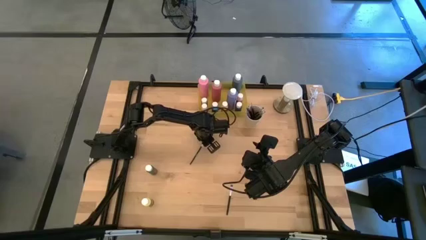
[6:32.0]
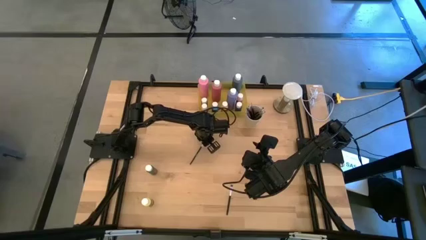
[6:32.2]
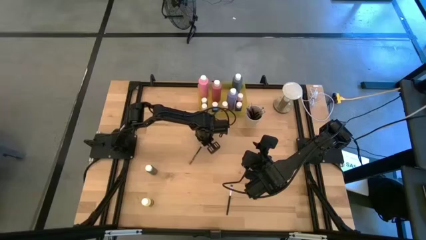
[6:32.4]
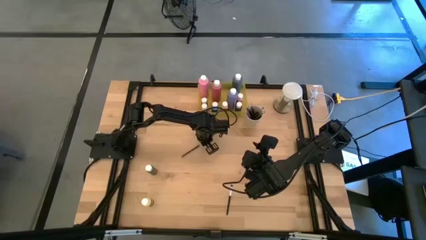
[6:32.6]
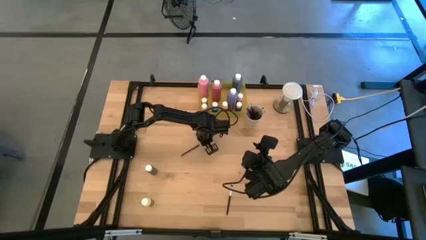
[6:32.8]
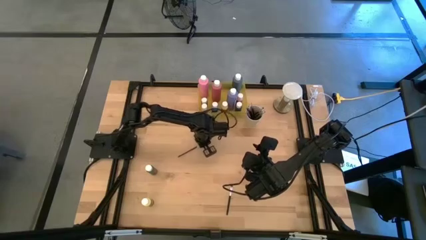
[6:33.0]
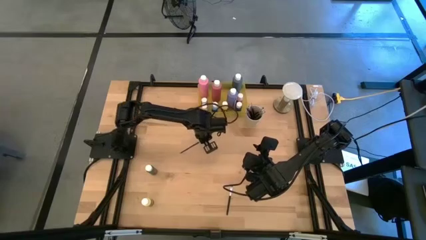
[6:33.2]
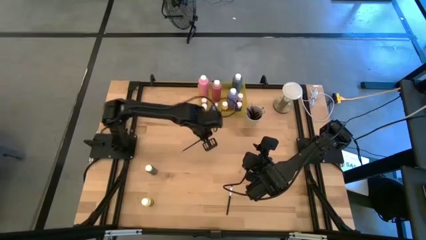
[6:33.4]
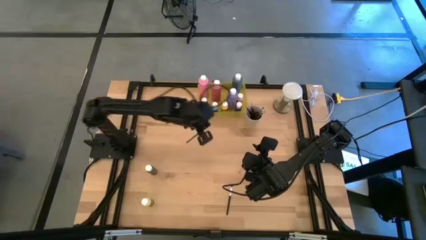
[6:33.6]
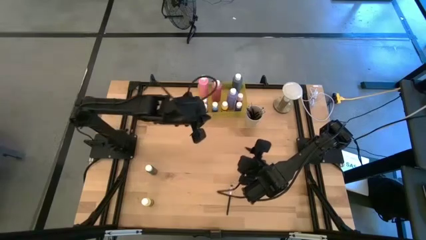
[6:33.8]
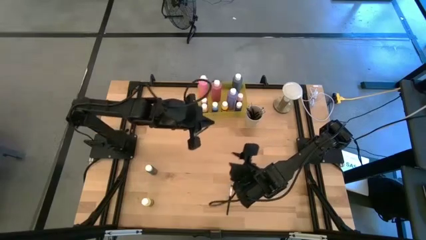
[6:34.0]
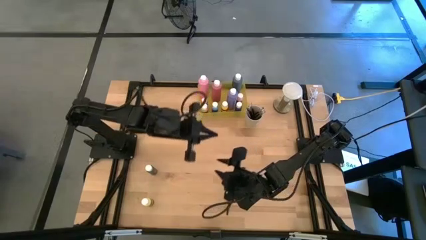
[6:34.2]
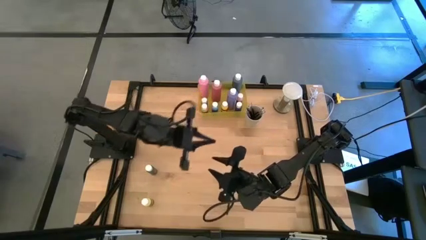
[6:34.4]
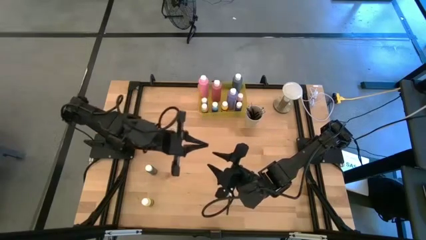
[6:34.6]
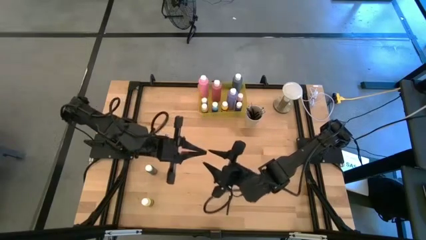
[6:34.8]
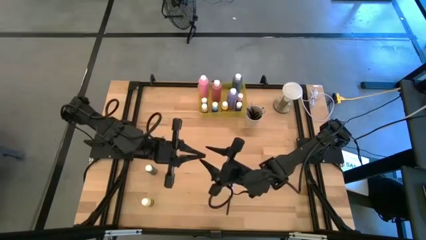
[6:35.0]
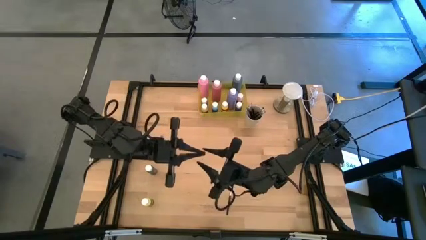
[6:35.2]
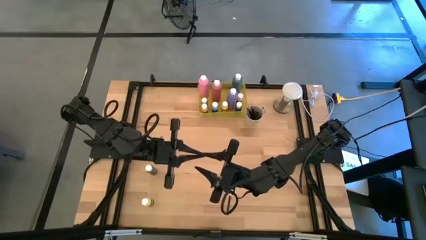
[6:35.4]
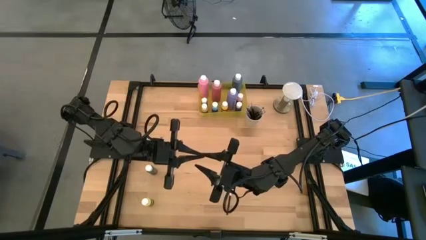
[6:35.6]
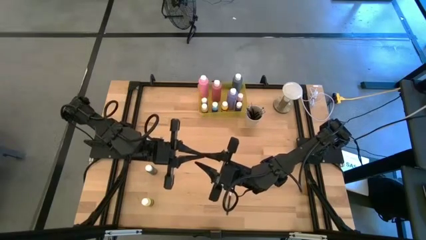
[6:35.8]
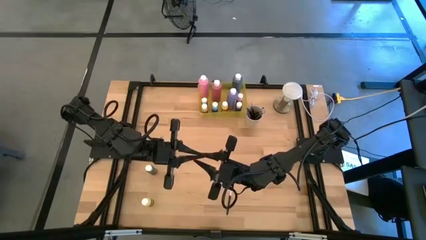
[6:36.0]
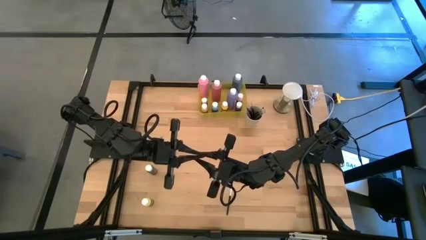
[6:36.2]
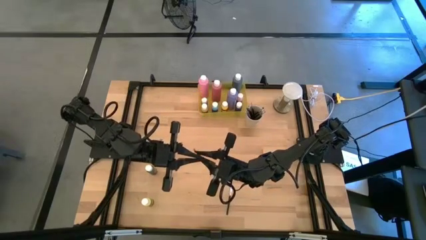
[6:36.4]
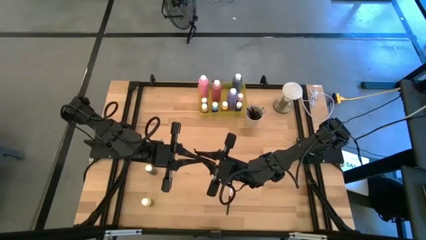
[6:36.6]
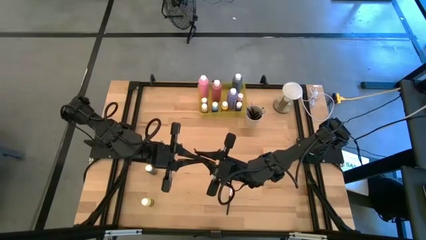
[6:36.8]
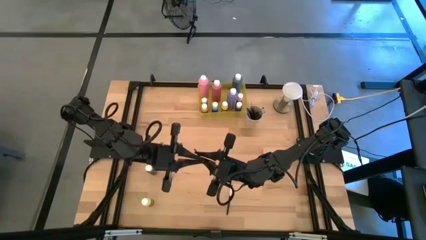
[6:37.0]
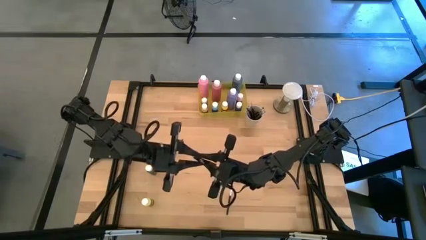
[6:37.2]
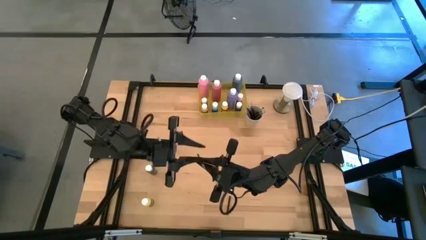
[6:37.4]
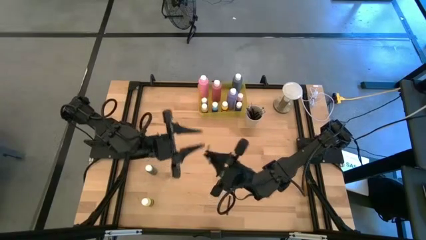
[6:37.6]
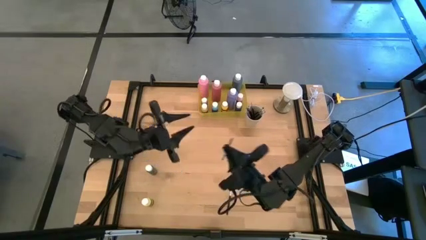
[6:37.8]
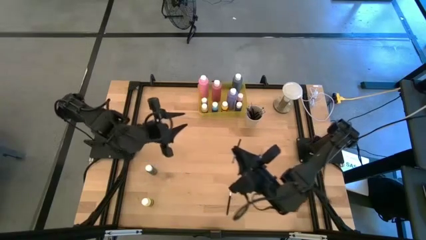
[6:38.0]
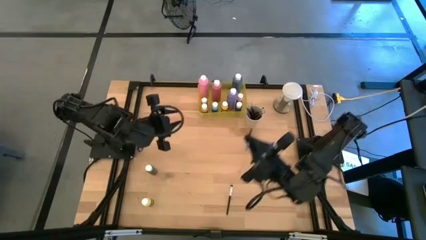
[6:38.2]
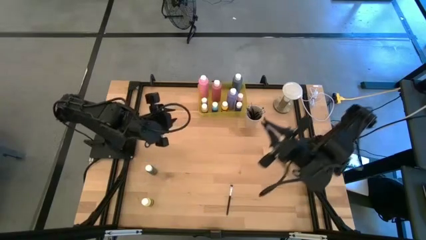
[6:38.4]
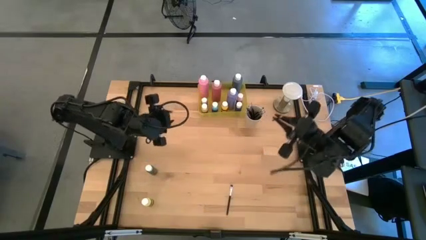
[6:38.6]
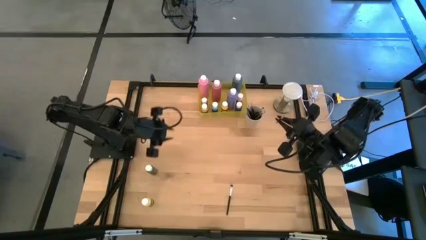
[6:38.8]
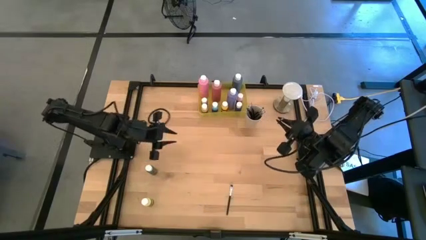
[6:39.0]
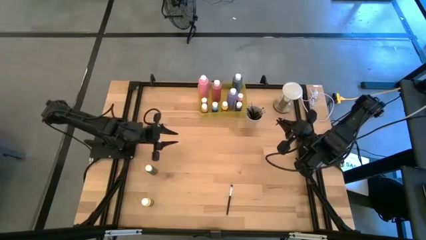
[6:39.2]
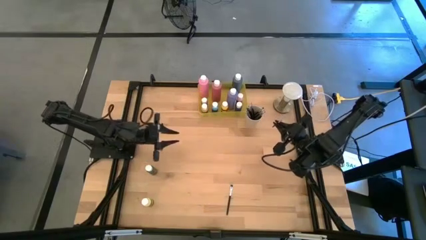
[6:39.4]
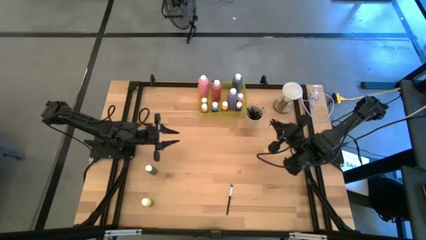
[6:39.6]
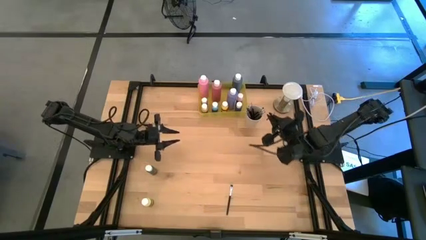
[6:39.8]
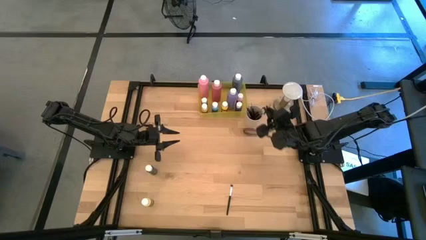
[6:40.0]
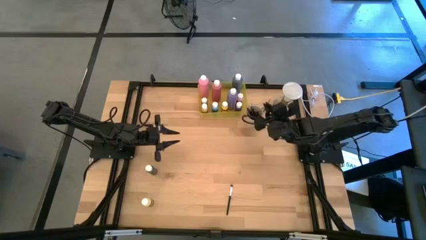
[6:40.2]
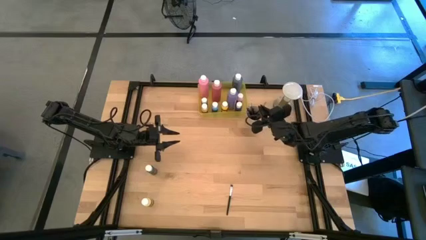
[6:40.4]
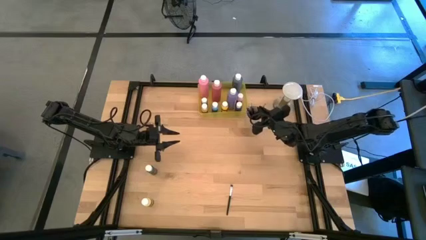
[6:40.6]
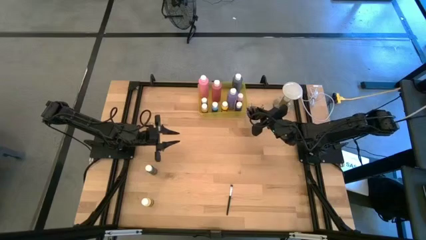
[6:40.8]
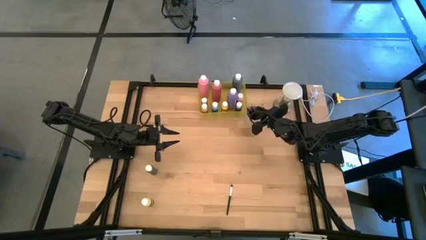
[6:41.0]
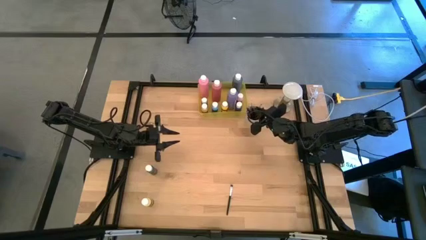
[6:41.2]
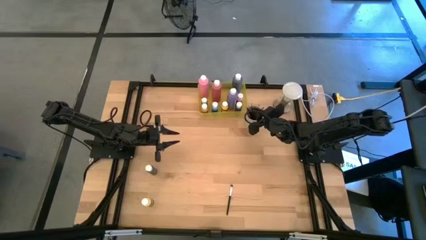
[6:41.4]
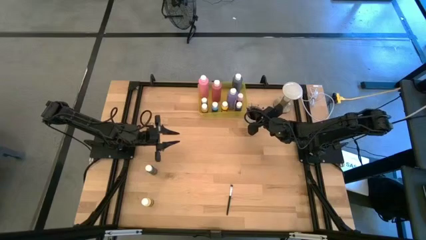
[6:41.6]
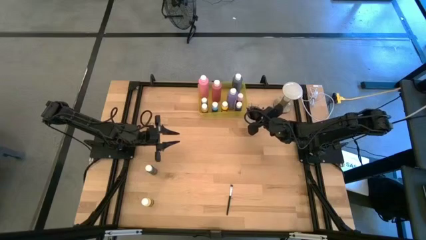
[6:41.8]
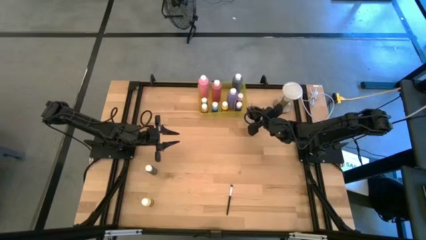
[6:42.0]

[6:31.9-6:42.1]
Task: Pick & Place Paint Supplies
Put the silver paint brush into the white cup

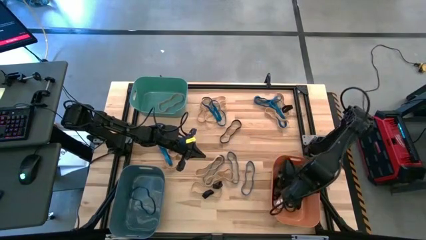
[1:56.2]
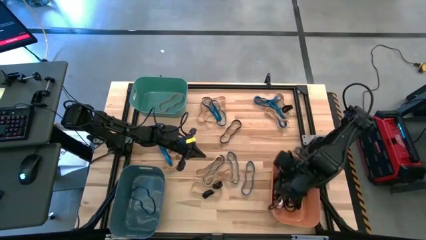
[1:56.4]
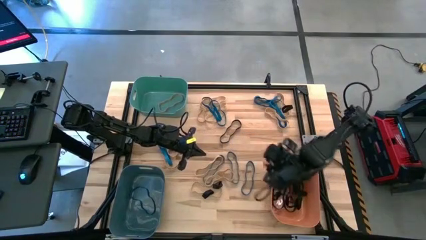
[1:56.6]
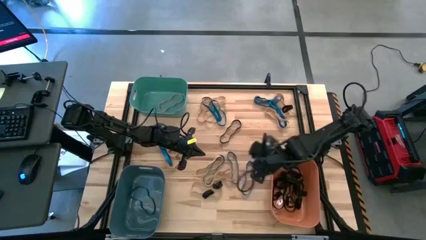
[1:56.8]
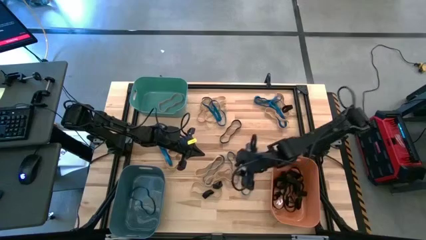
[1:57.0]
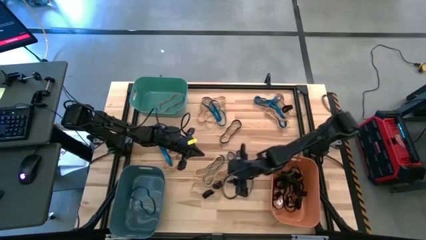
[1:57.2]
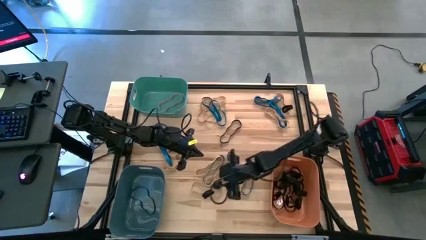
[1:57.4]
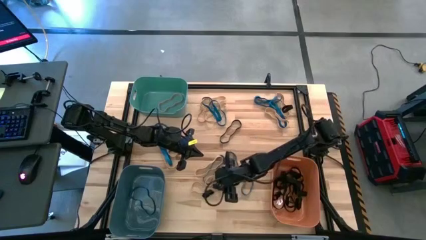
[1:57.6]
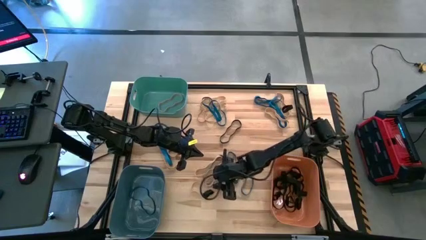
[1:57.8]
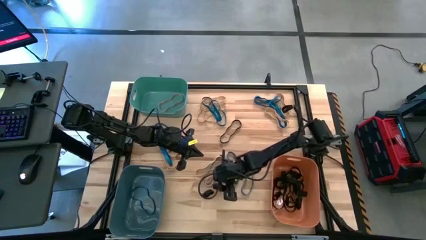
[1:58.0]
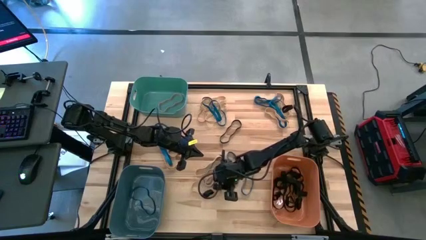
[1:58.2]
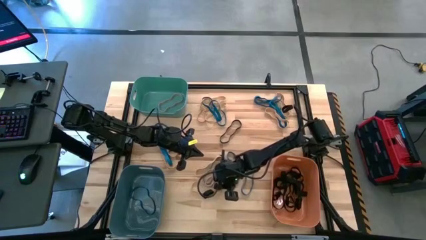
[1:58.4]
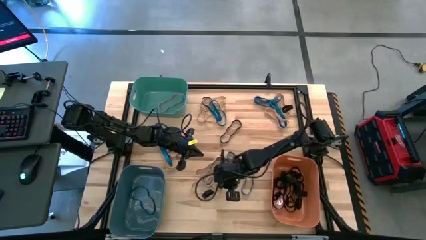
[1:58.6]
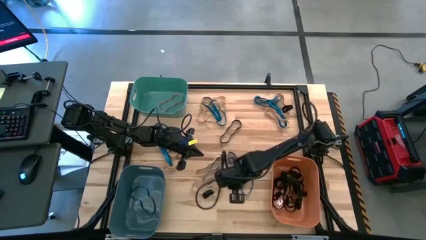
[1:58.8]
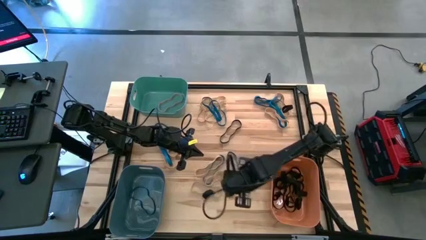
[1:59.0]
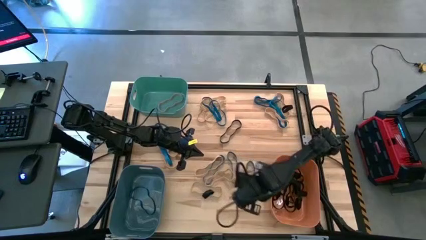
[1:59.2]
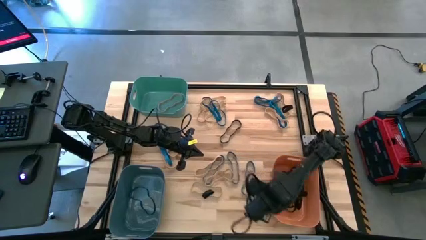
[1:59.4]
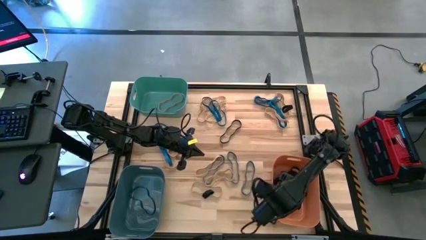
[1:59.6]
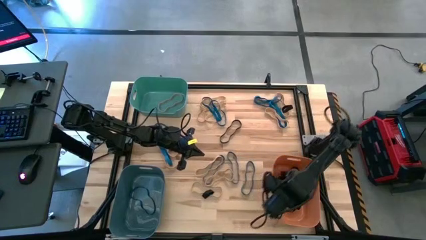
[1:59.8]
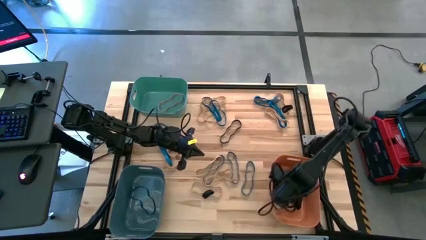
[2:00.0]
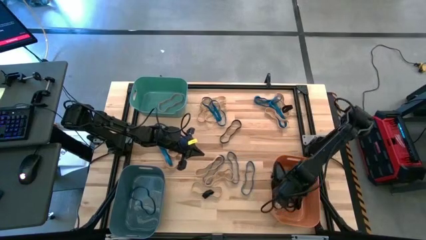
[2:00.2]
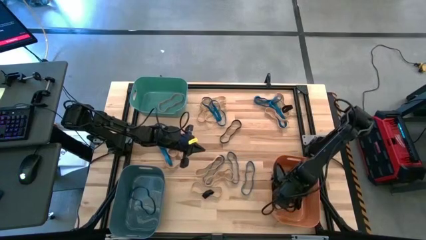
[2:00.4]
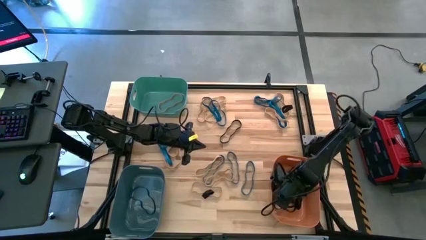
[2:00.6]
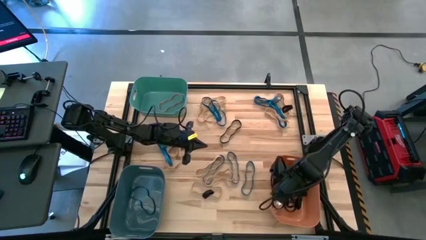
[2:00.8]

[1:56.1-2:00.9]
Task: Sort rubber bands into baskets
Put the black rubber band into the orange bin
